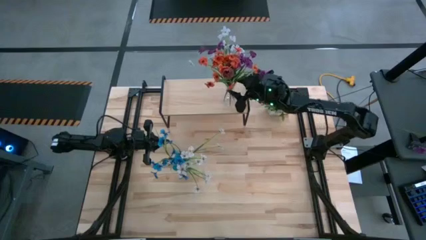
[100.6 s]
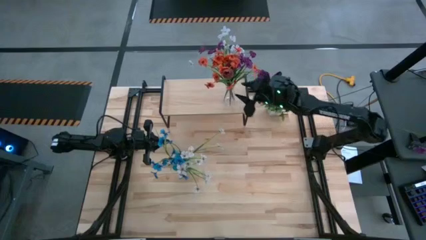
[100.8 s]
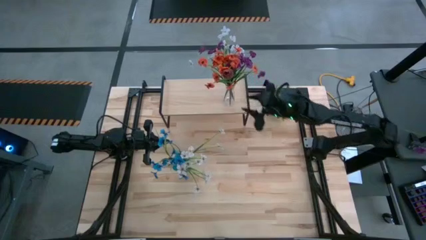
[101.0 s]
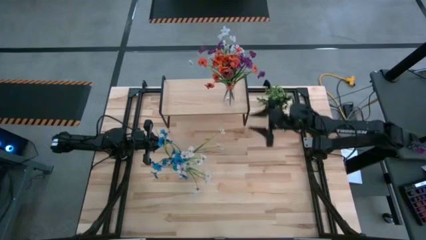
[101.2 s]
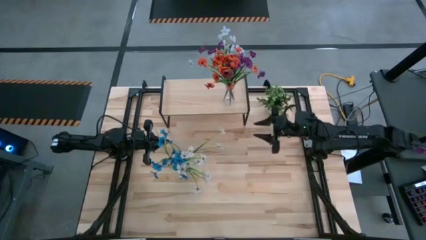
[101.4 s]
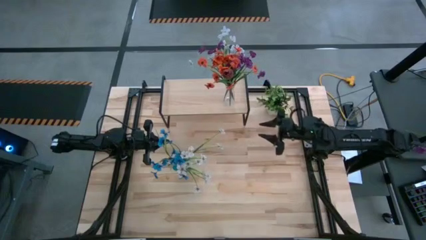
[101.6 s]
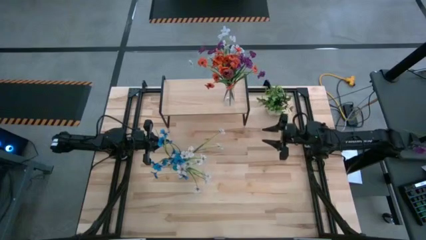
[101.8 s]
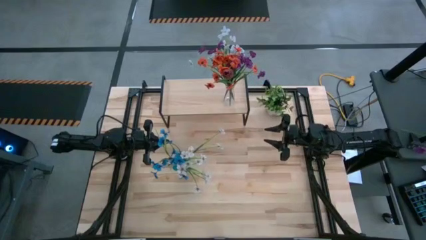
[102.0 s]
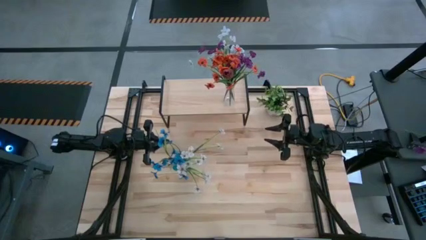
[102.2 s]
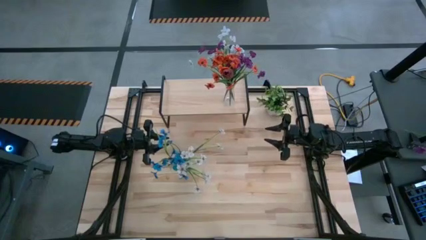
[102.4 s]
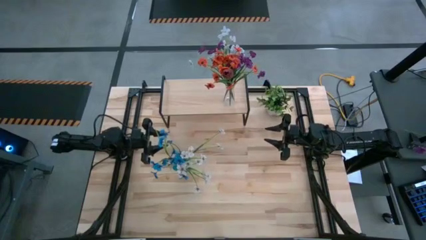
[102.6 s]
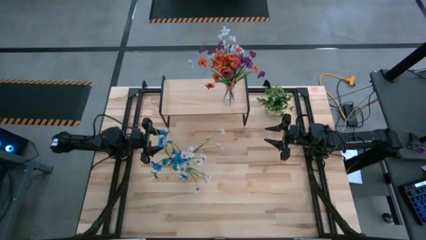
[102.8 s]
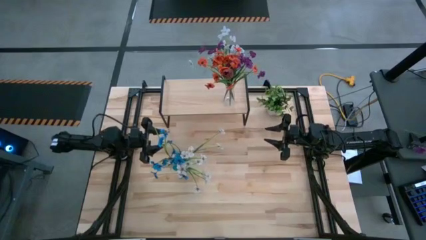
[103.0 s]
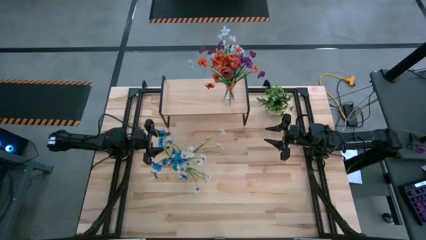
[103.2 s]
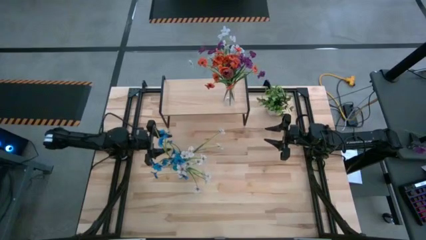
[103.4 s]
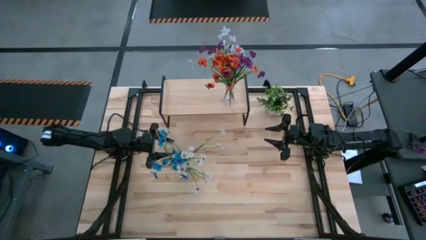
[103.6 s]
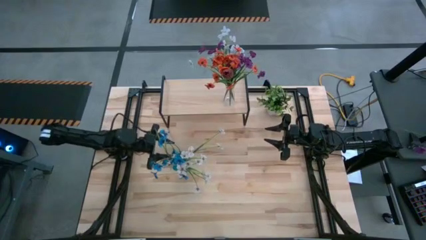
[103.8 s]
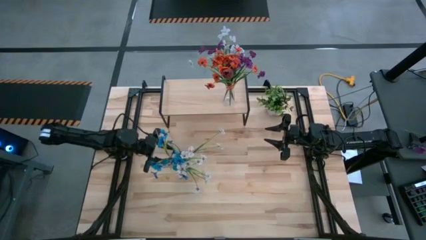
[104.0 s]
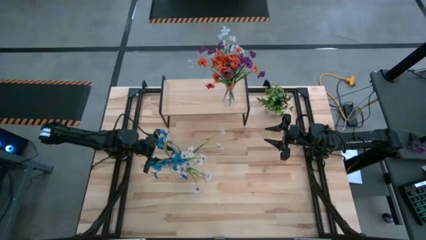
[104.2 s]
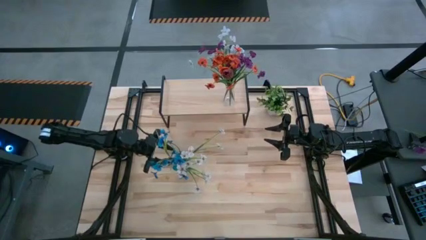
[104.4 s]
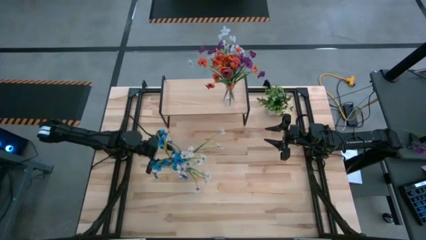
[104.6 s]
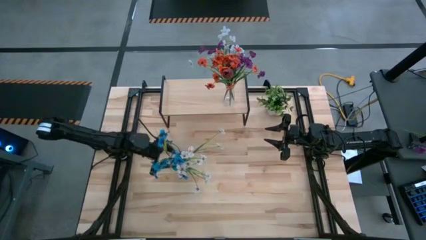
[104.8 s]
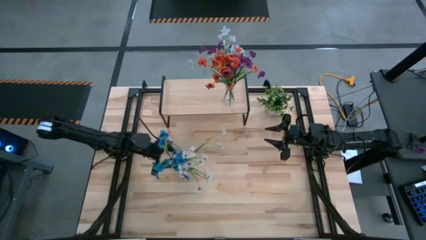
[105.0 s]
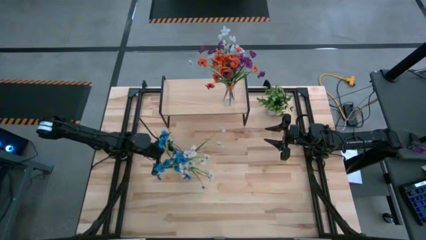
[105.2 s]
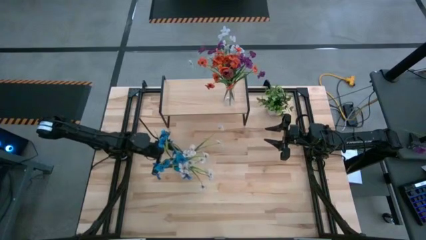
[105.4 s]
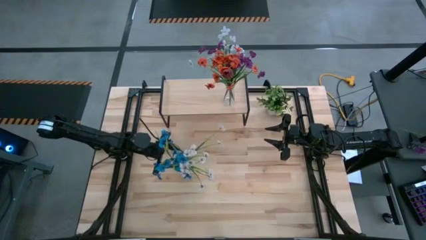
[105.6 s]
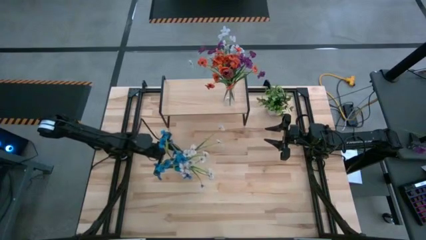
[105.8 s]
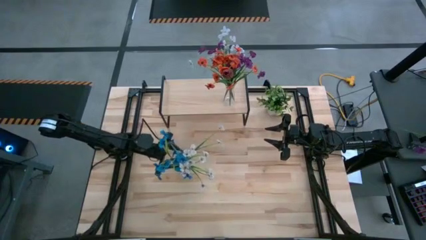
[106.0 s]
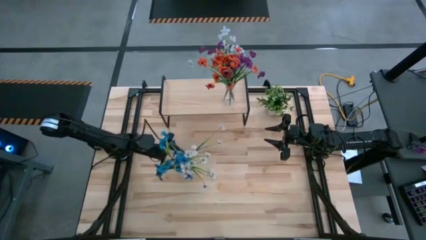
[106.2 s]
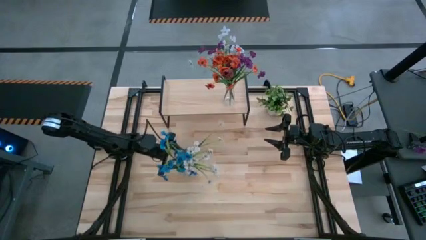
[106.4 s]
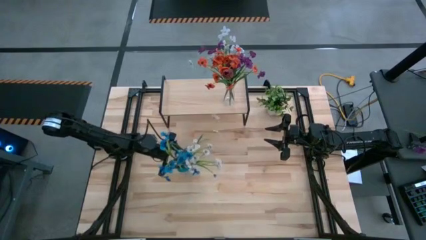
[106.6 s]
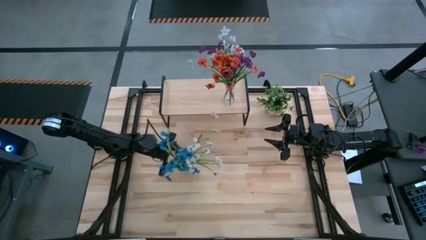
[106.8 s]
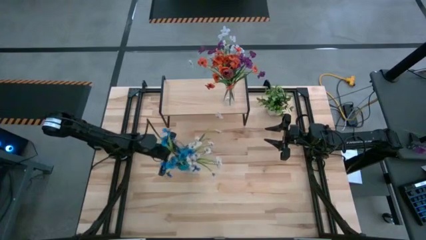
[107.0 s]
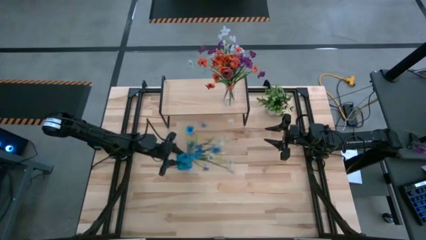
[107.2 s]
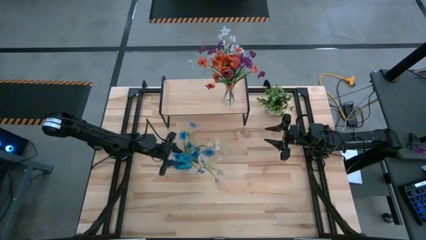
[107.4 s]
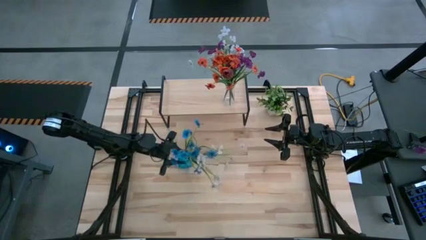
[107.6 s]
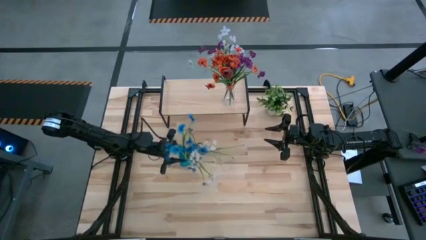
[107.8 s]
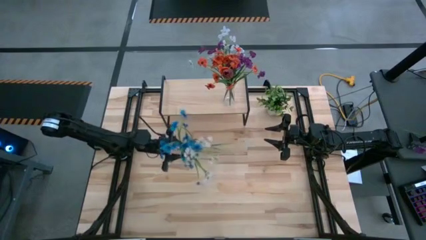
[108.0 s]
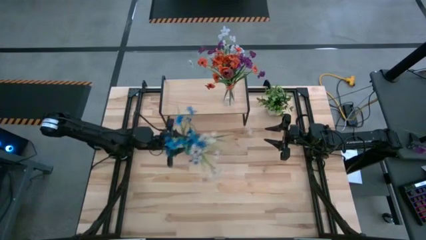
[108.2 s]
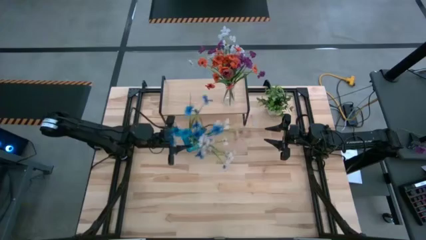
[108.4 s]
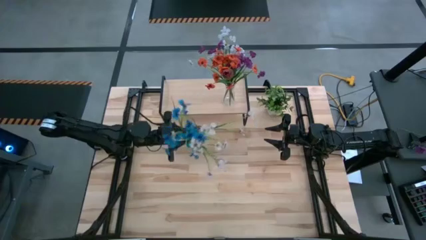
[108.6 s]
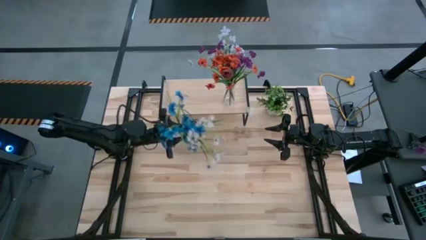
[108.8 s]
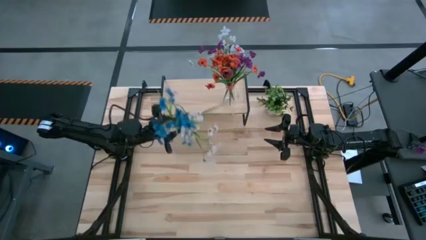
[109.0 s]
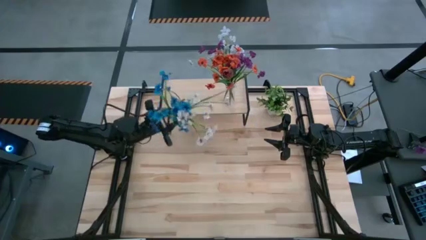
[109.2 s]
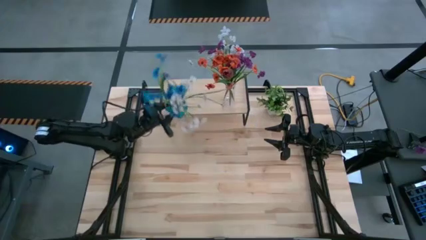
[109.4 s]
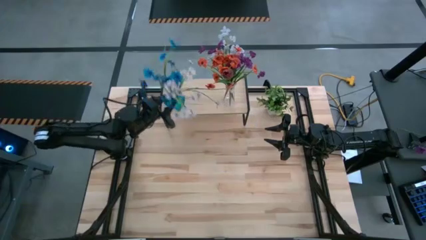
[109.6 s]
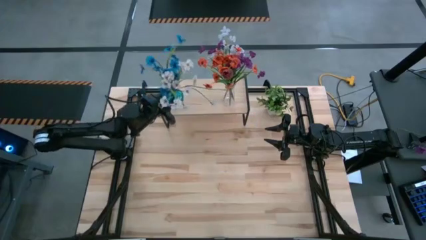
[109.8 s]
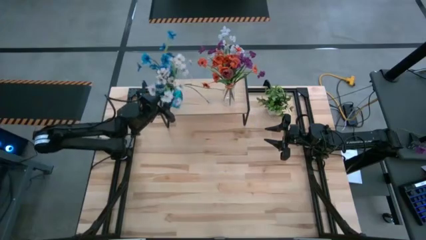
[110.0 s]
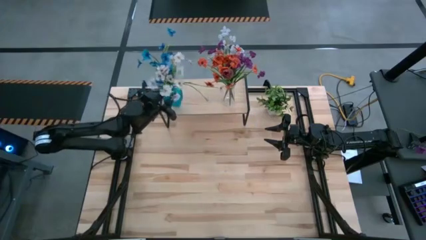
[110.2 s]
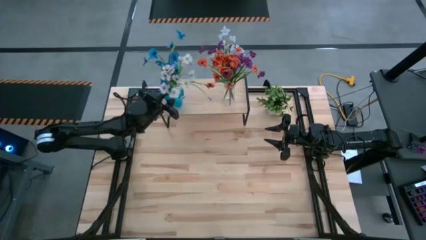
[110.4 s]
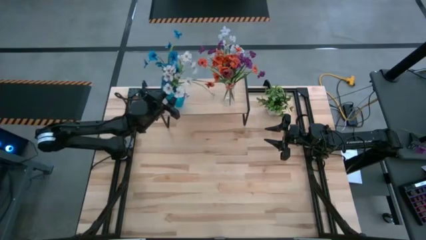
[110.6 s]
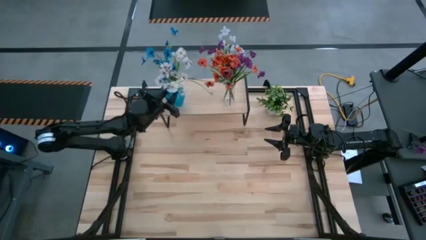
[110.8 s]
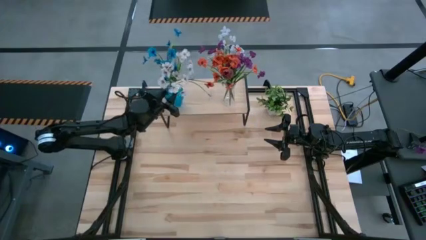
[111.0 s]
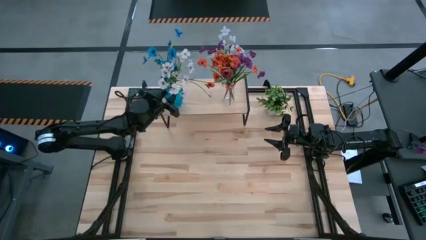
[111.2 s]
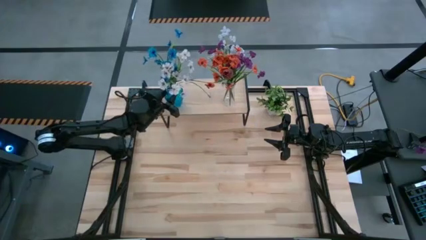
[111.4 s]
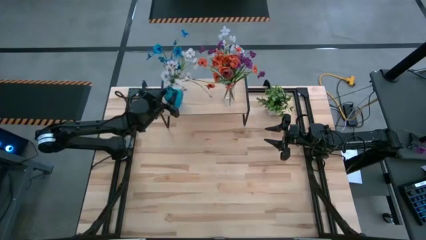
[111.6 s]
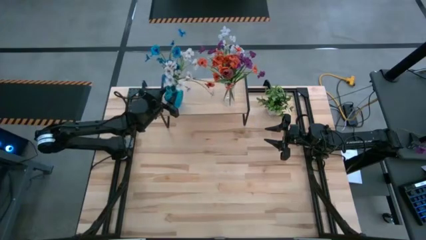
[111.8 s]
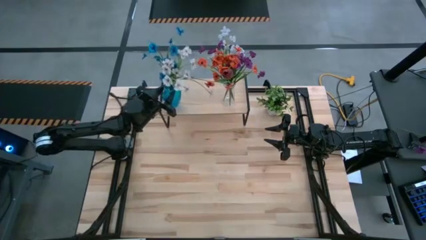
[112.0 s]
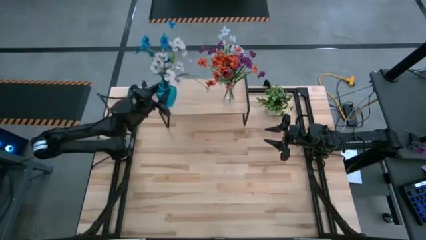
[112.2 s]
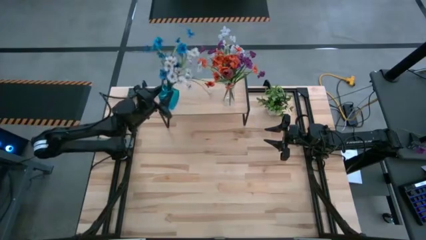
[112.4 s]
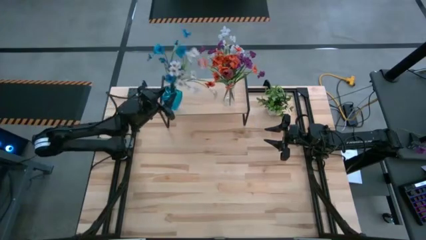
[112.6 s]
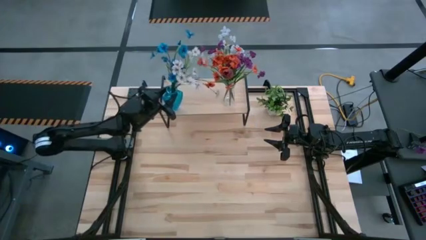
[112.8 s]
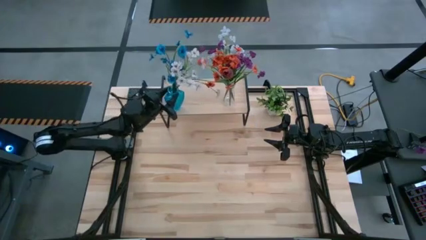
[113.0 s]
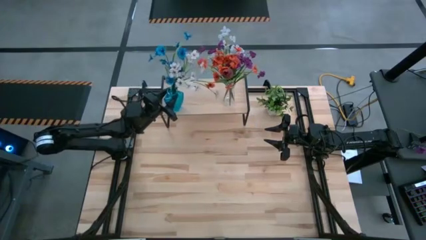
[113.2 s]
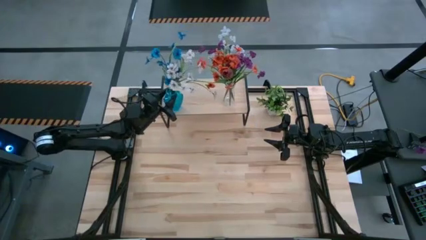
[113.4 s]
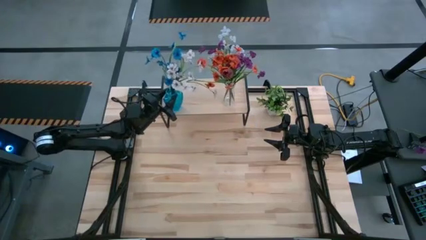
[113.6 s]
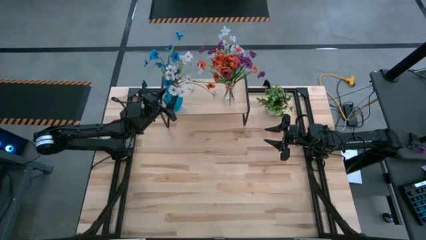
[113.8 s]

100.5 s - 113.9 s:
Task: Pick and place flowers into a vace then onto a shelf
Put the blue vase on the shelf
